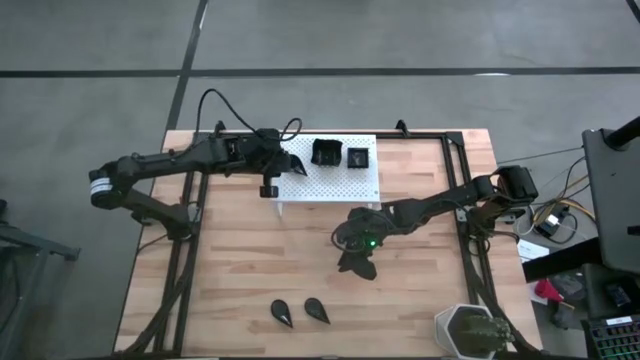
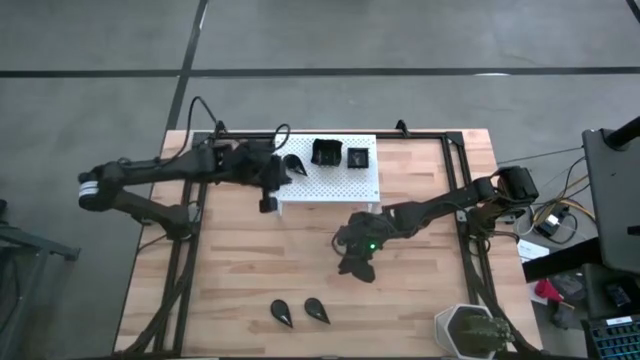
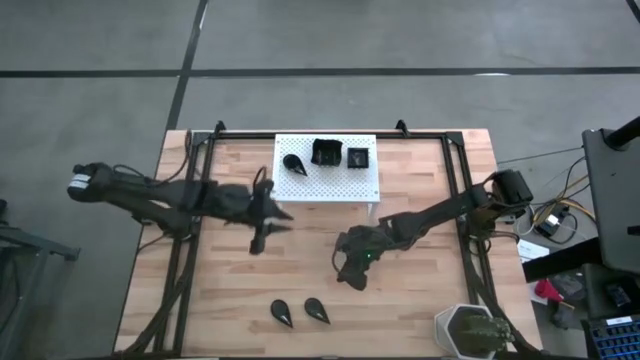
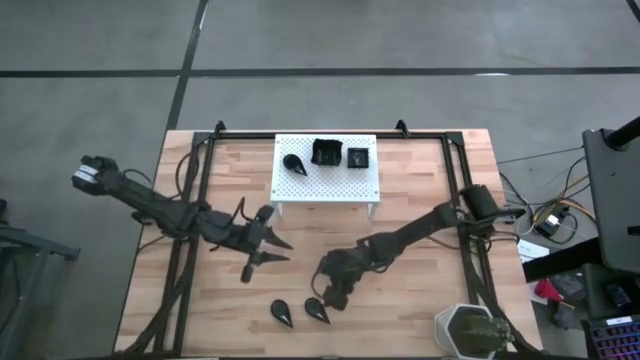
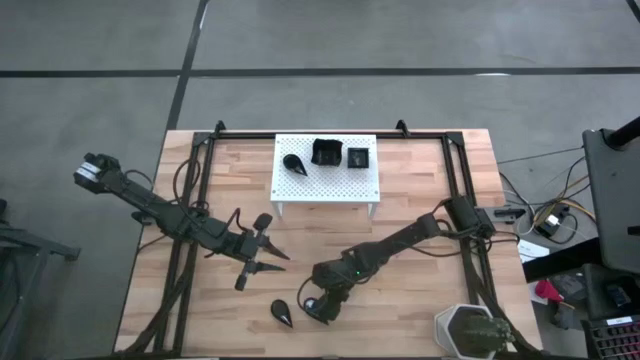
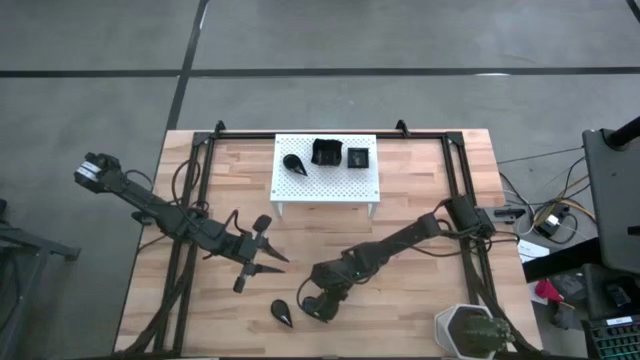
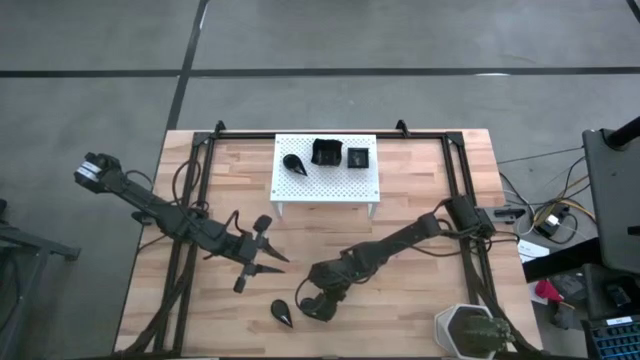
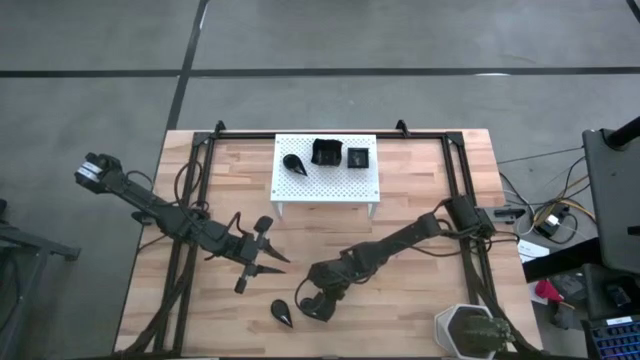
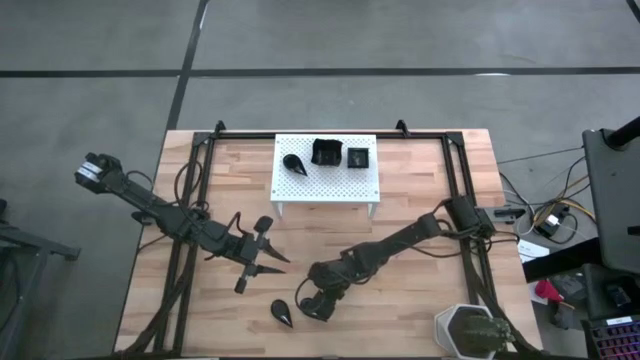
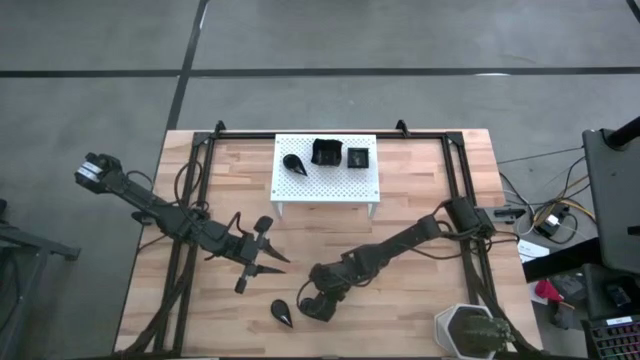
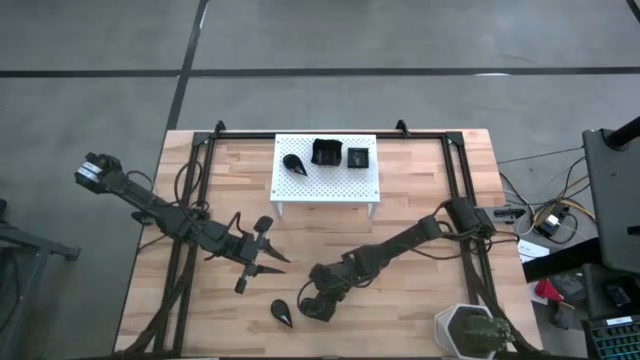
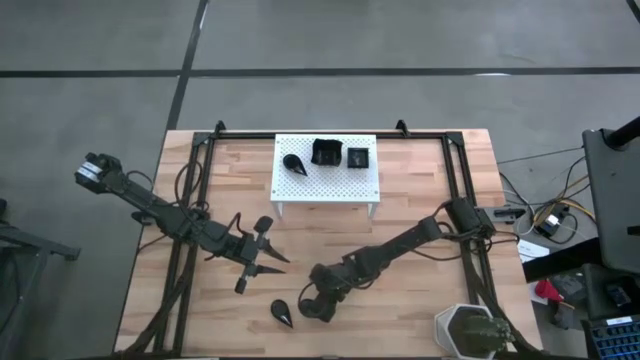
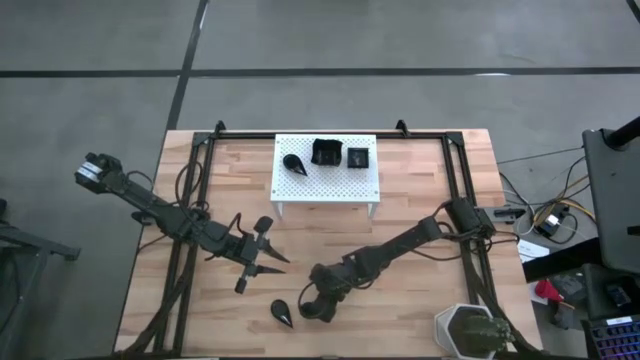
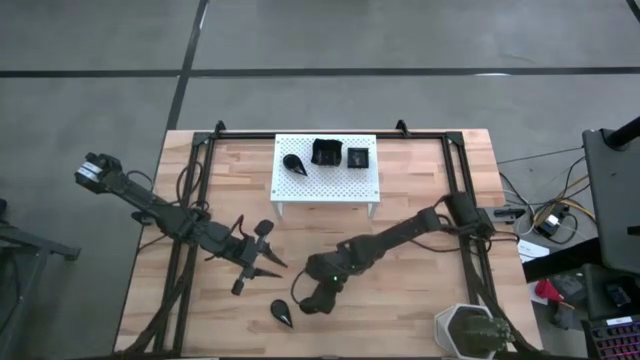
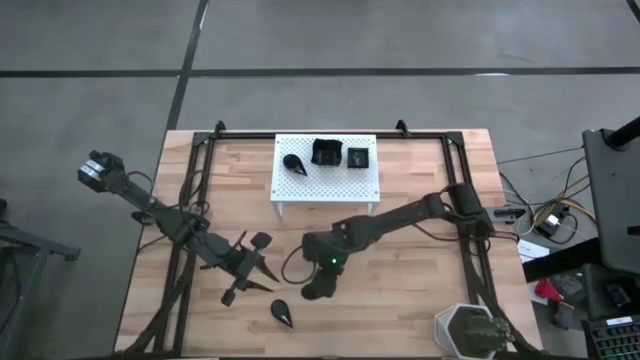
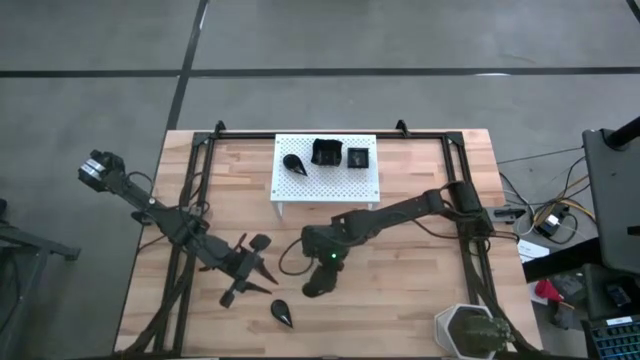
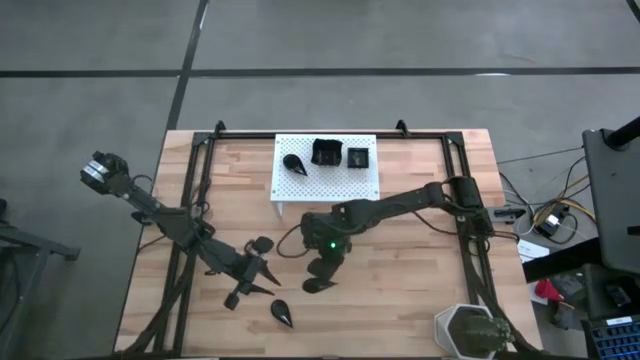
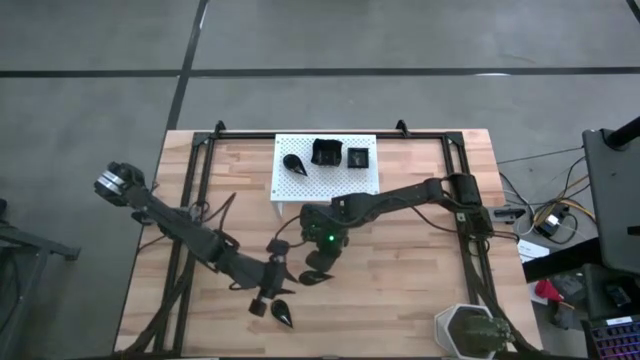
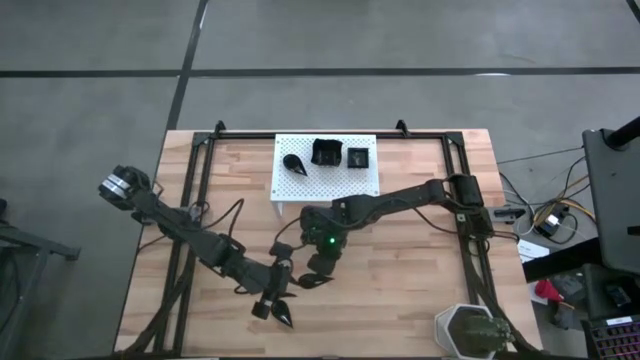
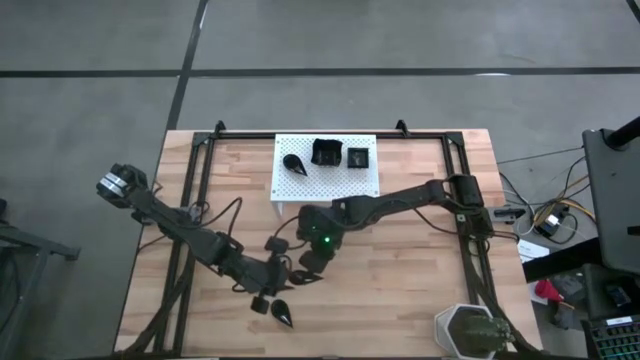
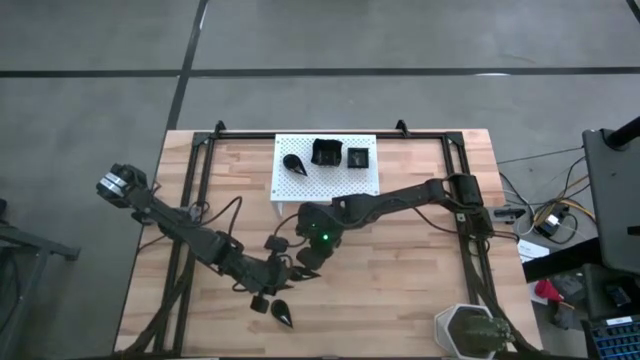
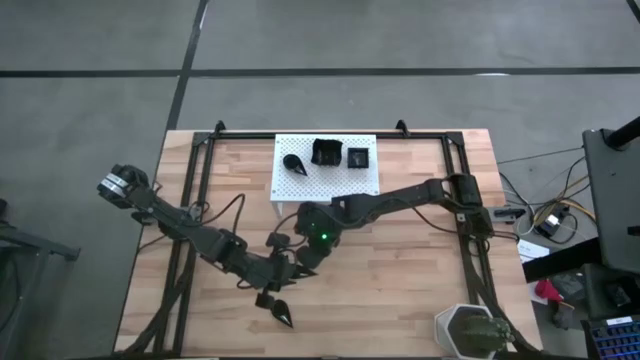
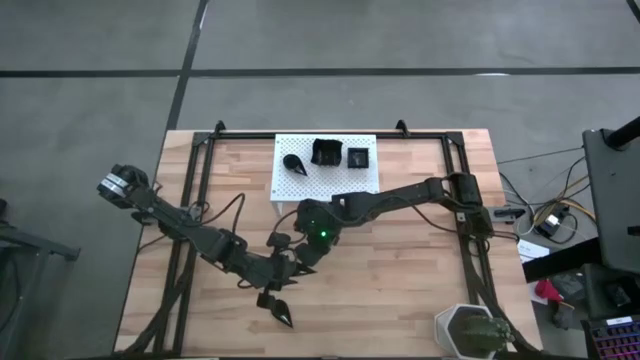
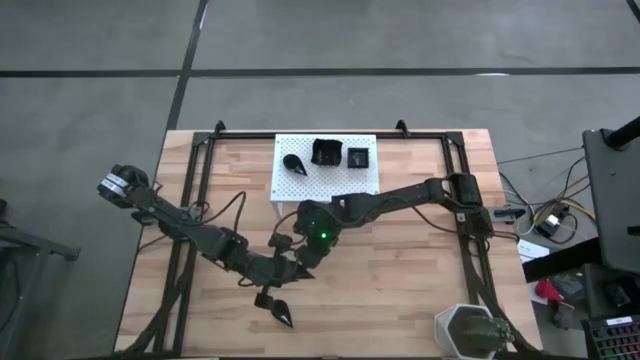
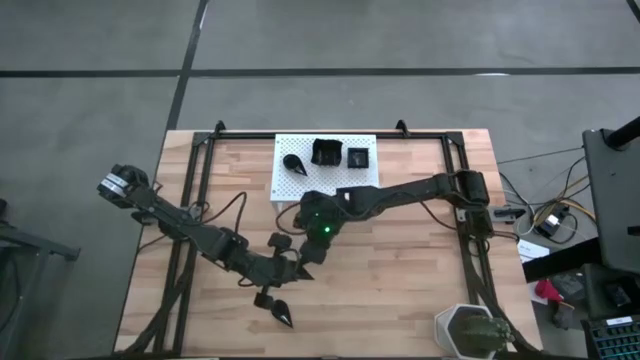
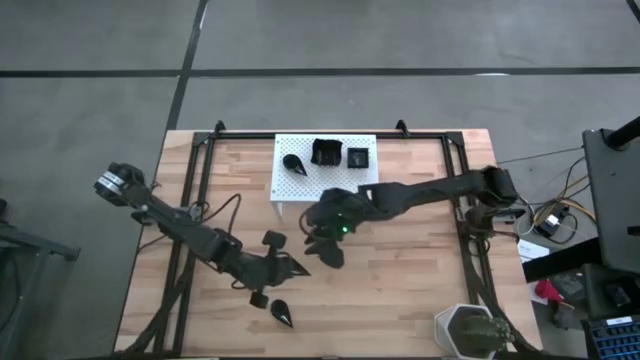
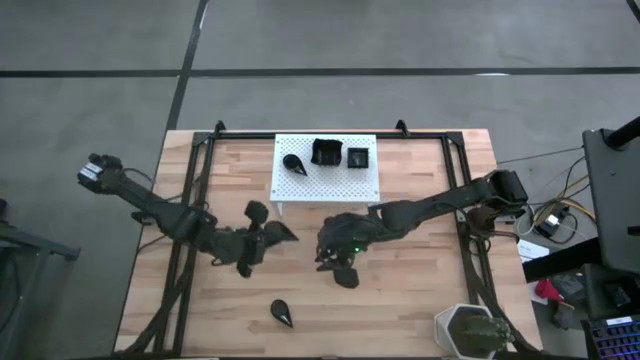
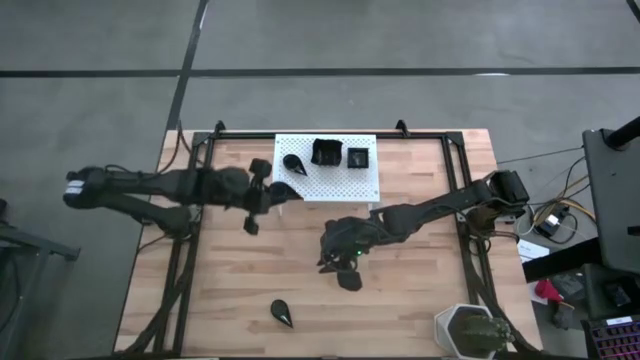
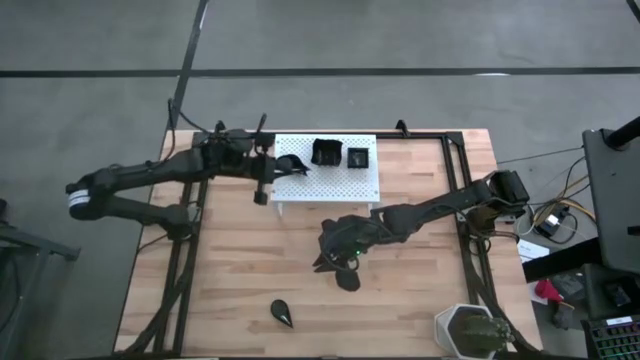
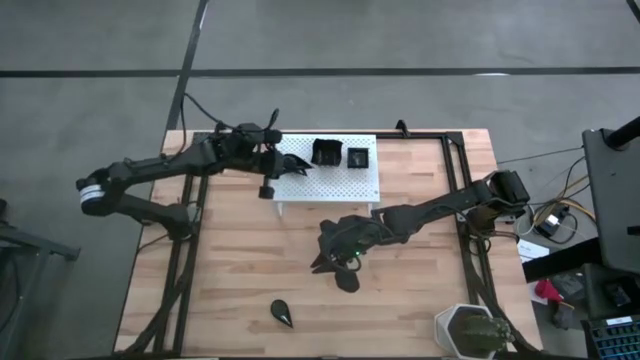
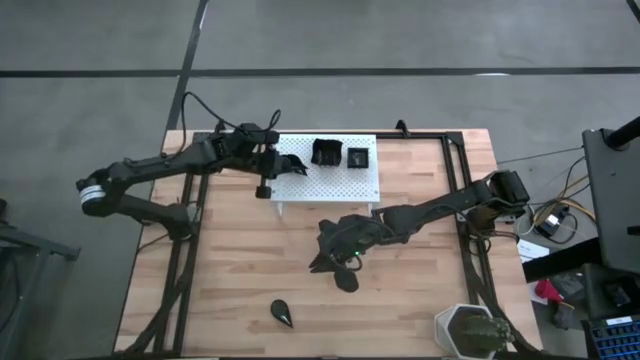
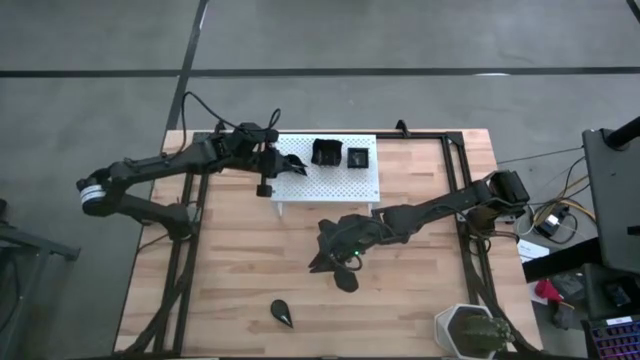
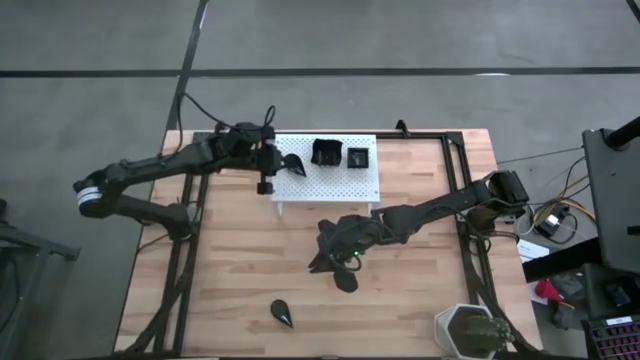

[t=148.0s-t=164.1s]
Task: Pick & Place Mini shaped plates
Stack the drop shaped plate on top of the drop shaped plate on the shelf

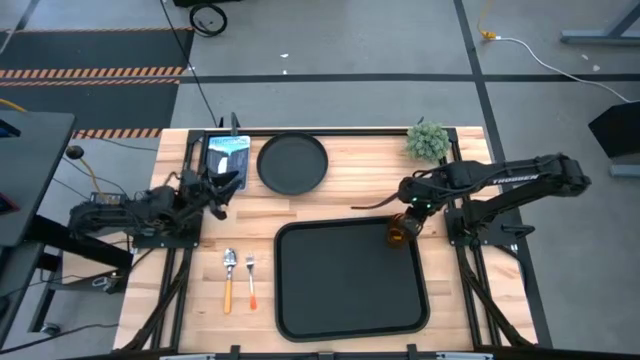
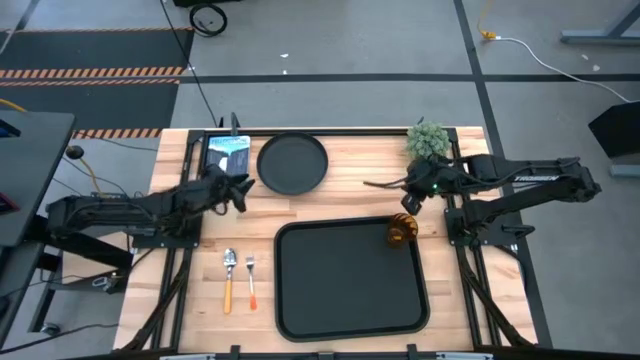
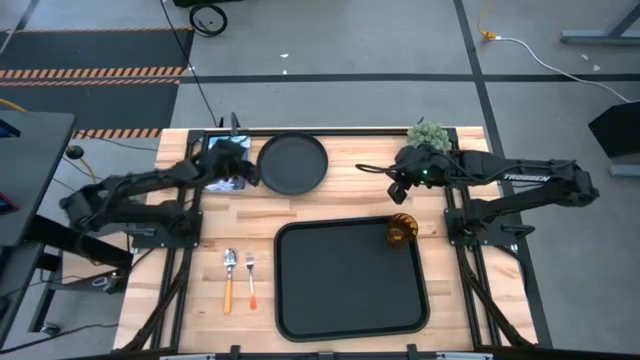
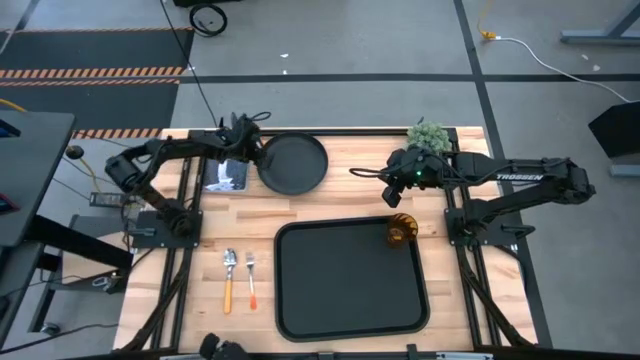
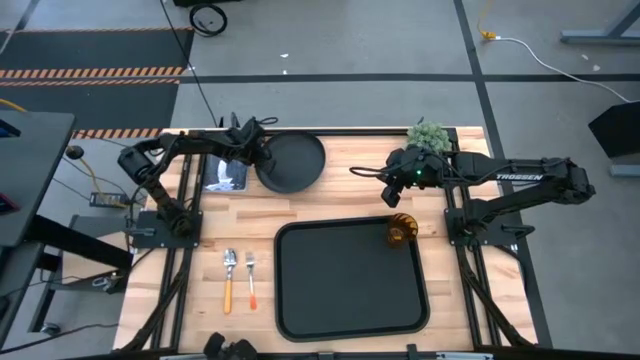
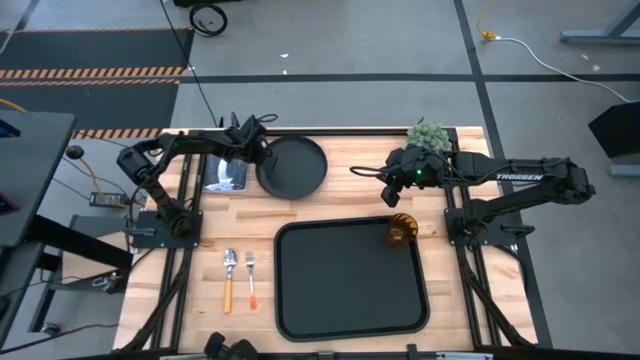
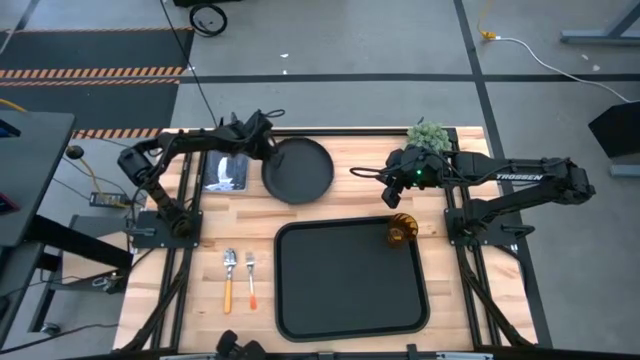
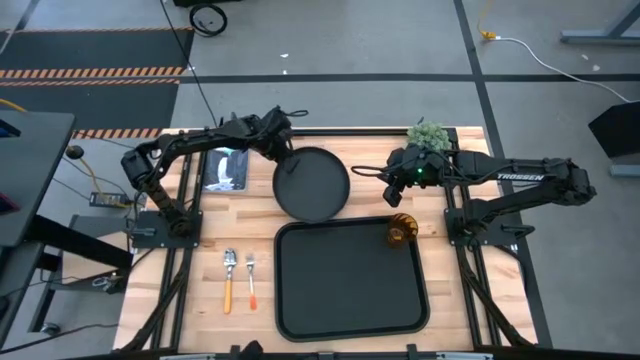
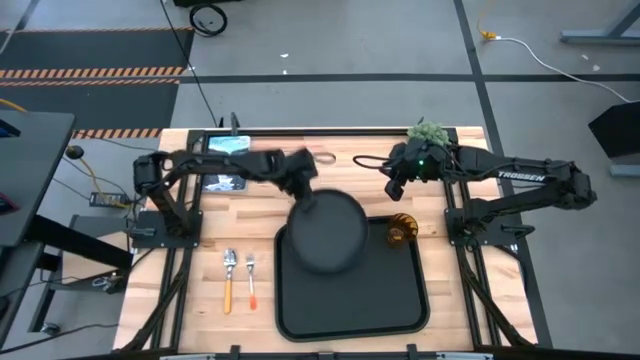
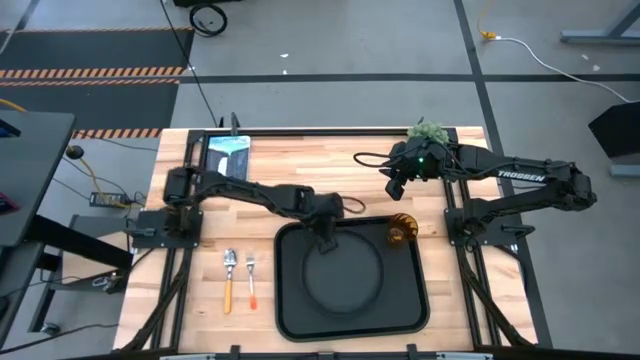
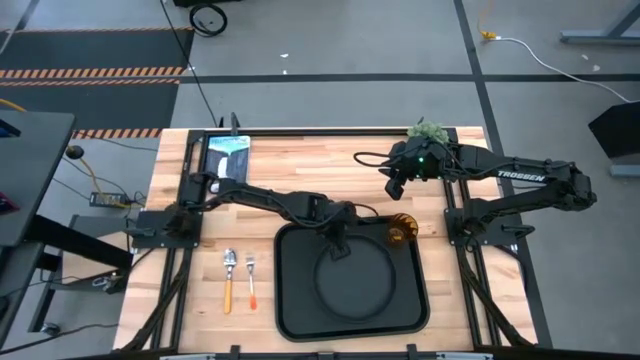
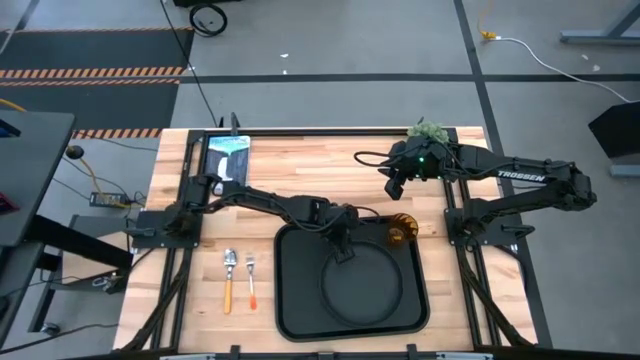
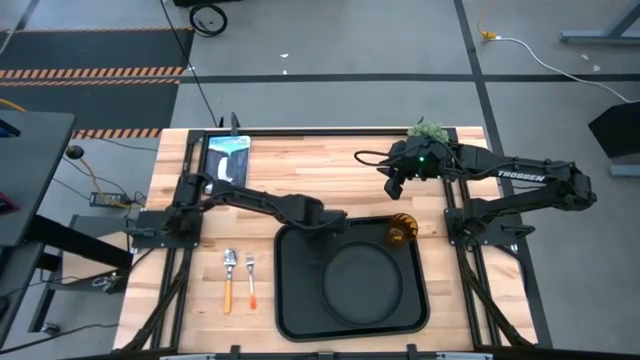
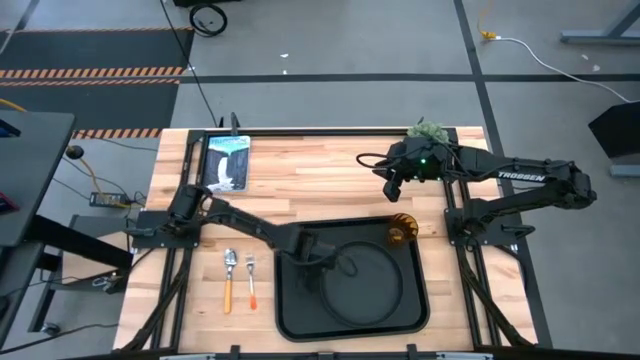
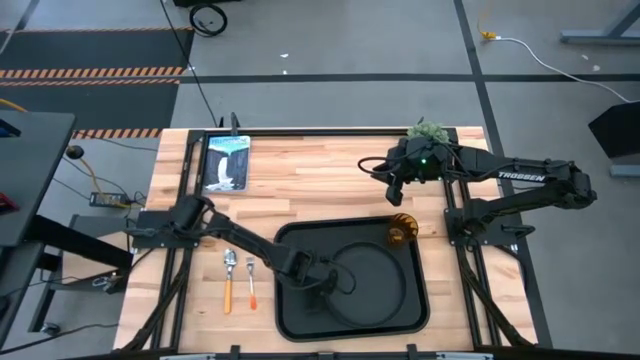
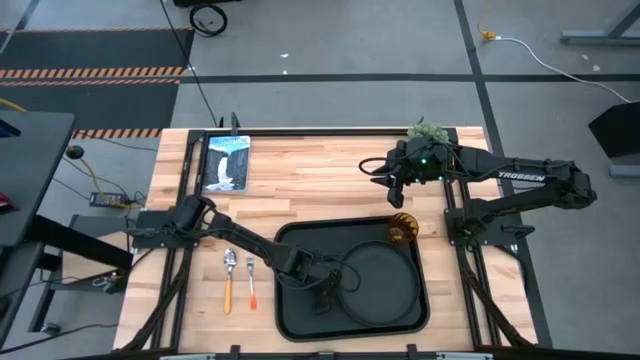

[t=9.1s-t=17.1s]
Task: Pick and place plate/cup/fork/spoon on tray
Put the black plate on the black serving tray to the bottom of the brown glass
